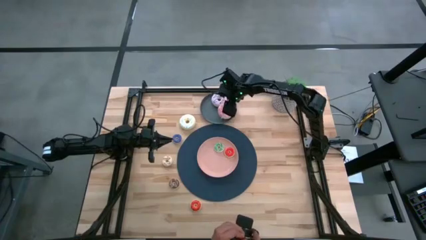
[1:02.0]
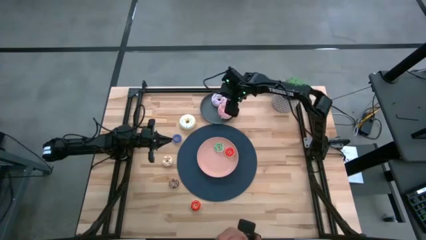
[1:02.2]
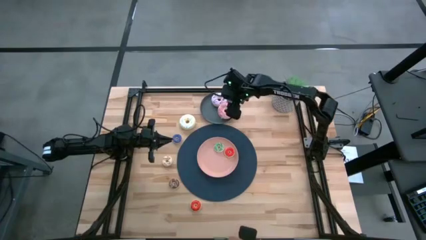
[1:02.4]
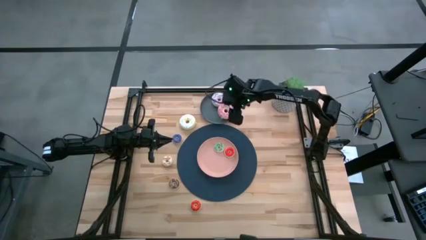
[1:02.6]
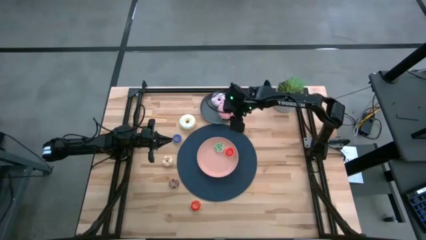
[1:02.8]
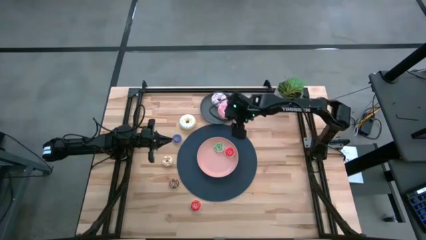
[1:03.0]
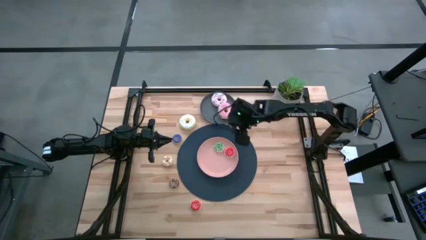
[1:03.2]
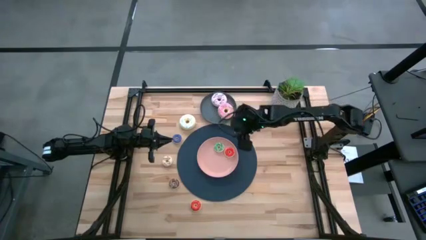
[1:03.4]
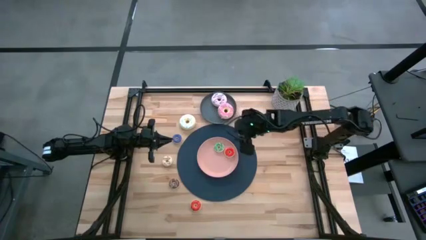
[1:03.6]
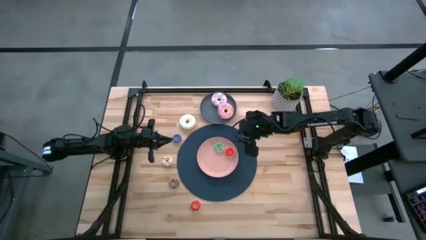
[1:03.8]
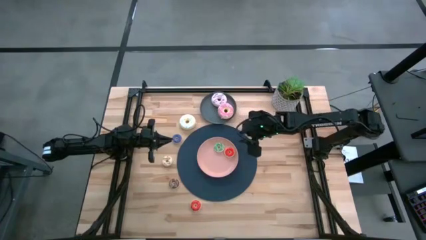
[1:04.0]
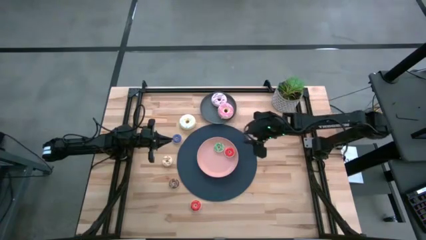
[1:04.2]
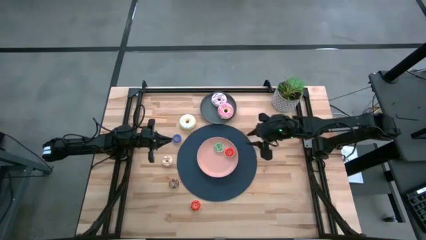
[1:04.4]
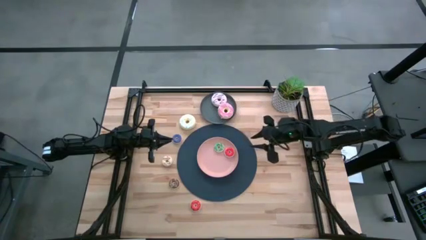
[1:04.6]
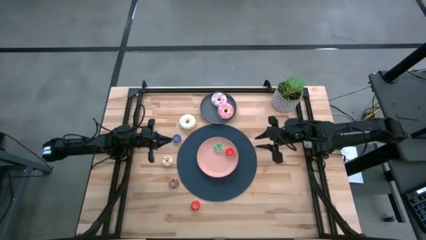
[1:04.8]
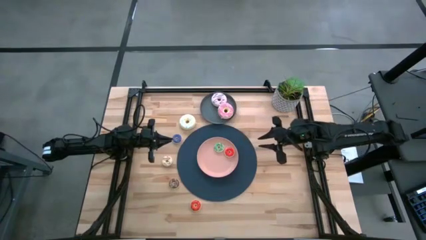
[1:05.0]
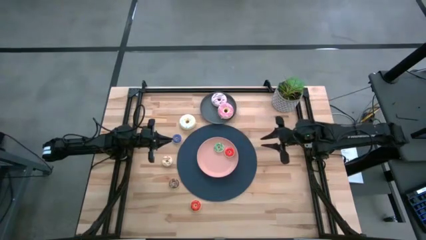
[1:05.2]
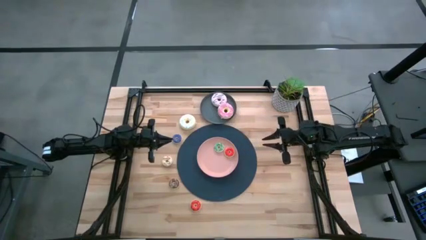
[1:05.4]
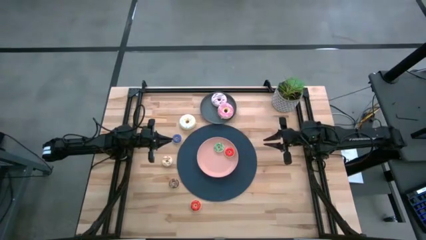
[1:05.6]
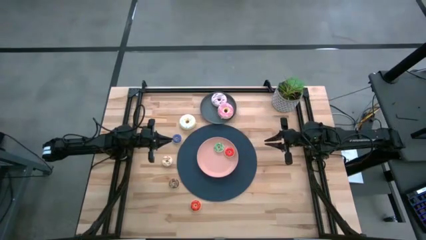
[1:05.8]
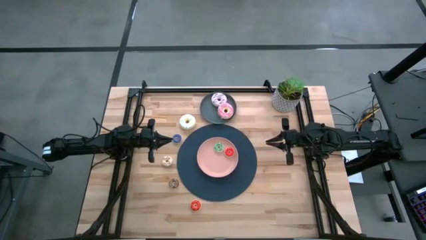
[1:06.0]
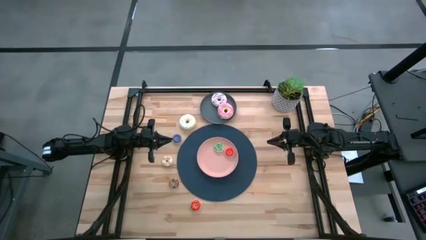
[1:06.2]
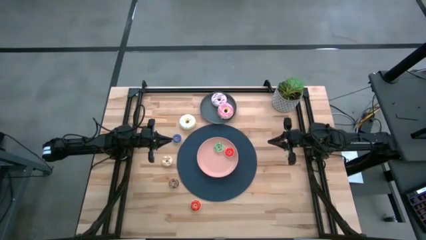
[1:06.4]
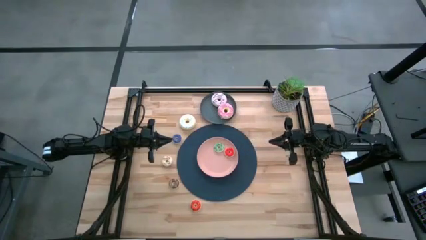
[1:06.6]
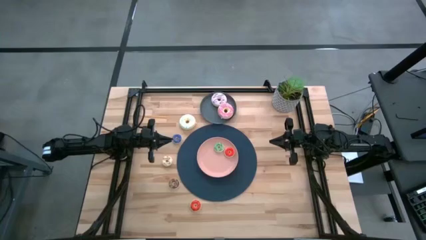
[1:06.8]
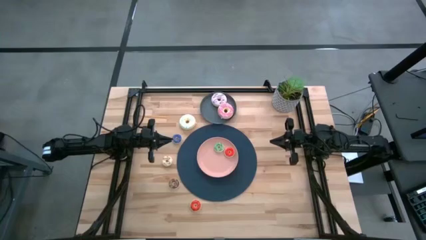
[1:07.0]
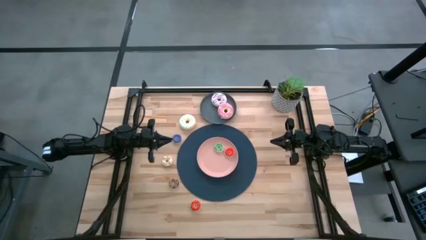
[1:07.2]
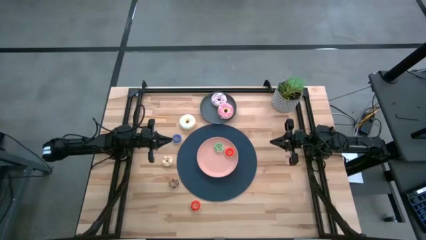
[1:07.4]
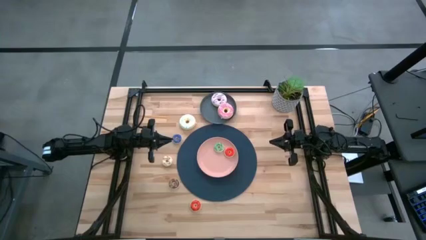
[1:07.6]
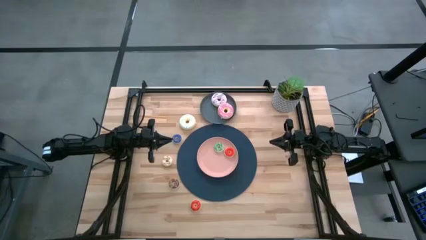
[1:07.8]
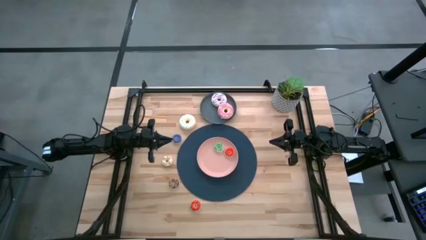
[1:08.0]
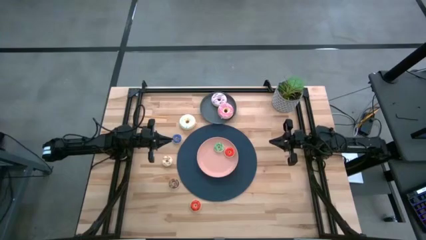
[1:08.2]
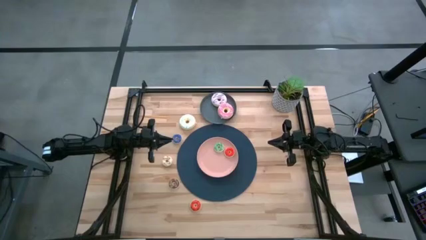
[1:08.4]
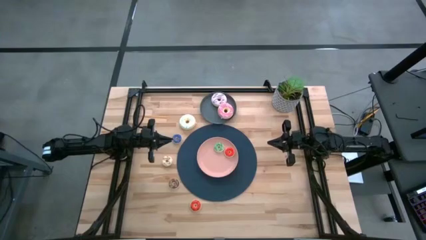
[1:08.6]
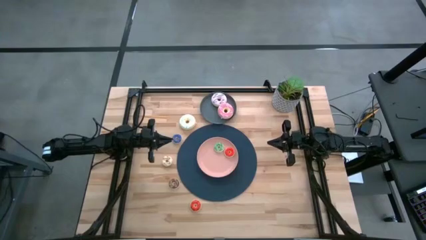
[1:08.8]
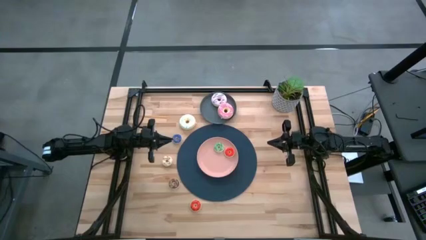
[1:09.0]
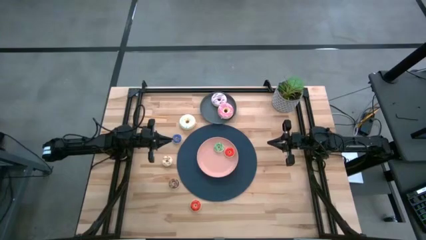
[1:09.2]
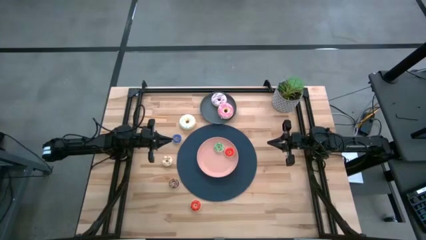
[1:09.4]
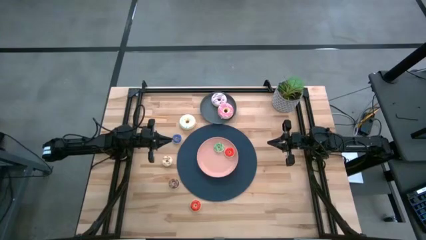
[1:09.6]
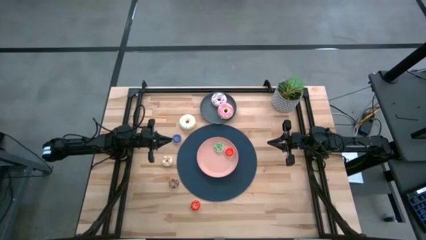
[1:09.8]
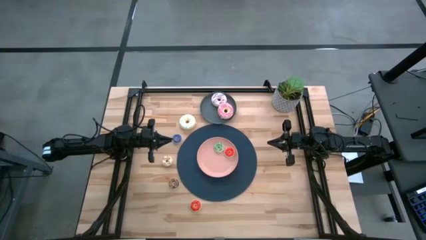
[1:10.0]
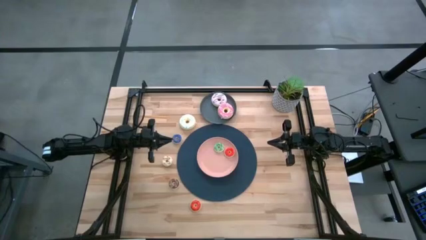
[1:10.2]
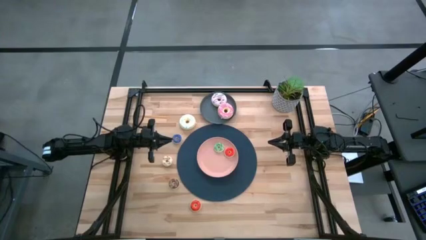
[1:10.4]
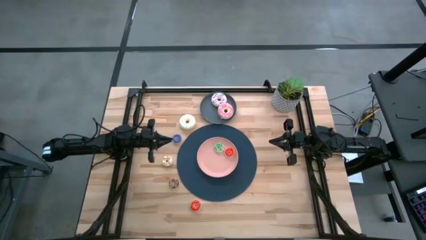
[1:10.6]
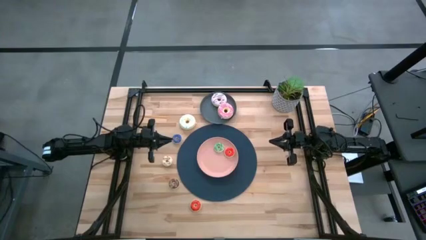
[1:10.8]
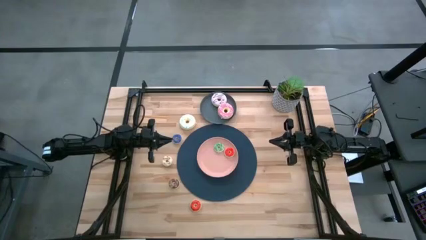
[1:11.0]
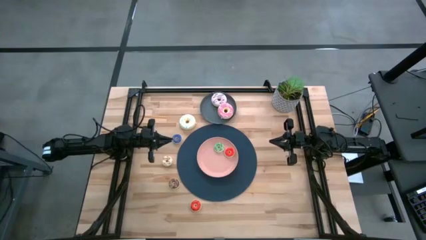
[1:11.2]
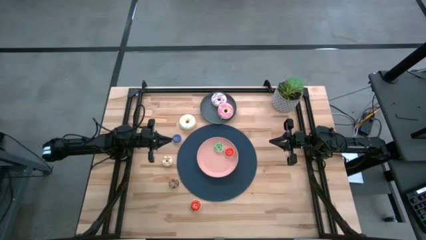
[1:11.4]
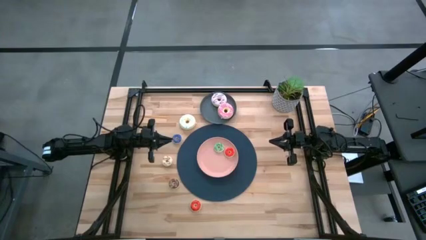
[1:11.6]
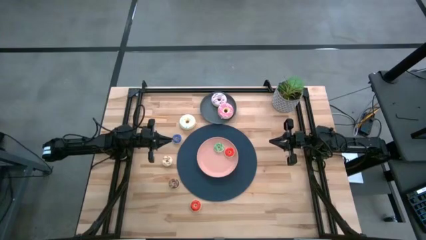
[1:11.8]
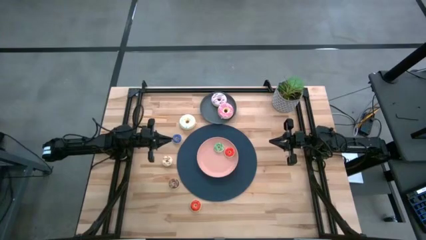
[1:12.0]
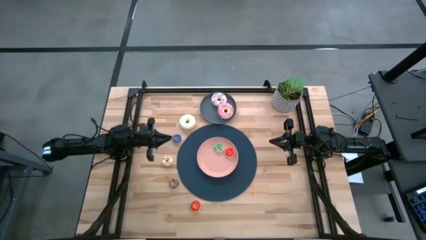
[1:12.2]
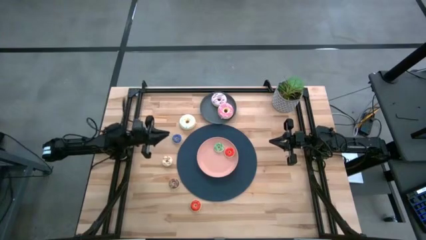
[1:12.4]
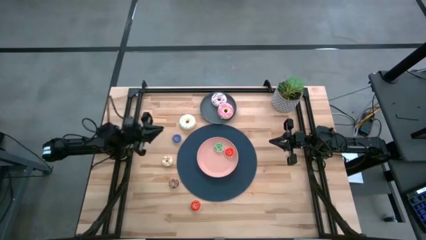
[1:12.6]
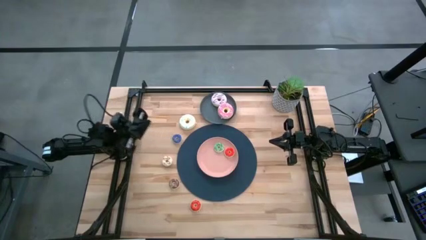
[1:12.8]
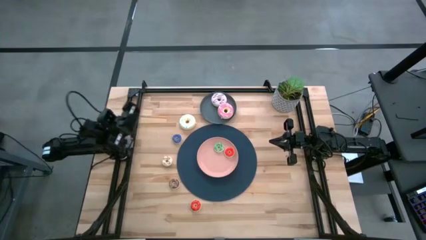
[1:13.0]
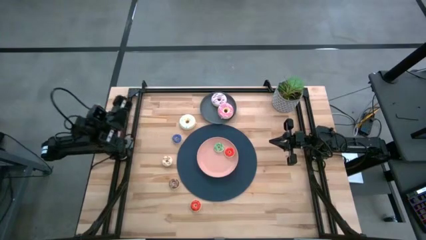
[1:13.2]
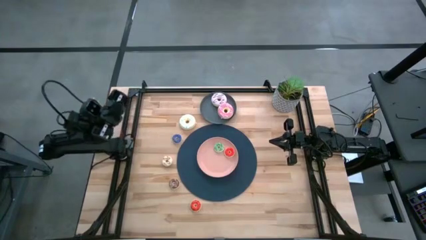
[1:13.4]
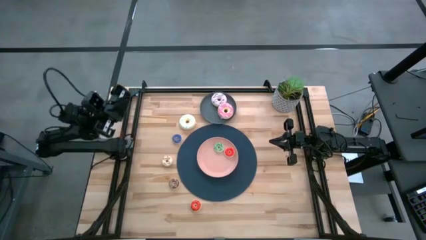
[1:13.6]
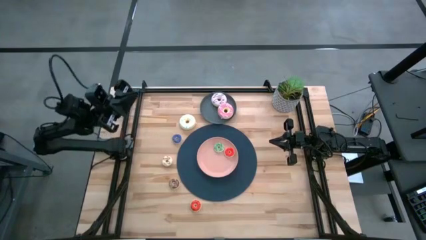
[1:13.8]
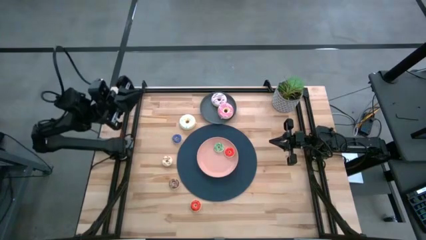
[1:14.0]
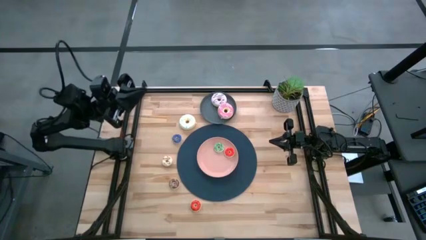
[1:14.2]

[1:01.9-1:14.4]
Task: Pick & Place donuts
Put the large white donut on the gray plate

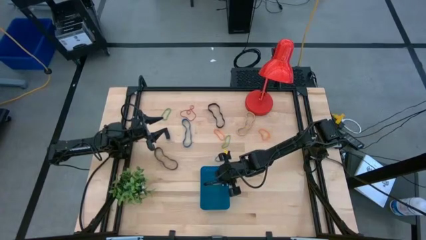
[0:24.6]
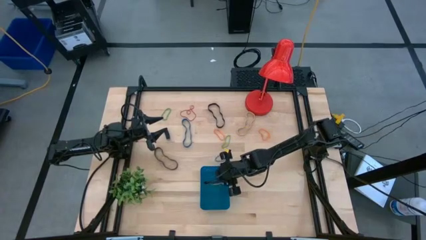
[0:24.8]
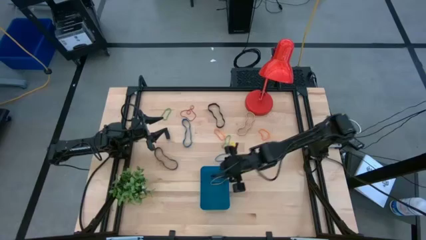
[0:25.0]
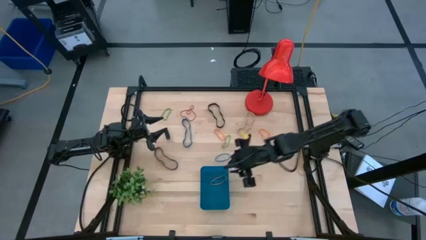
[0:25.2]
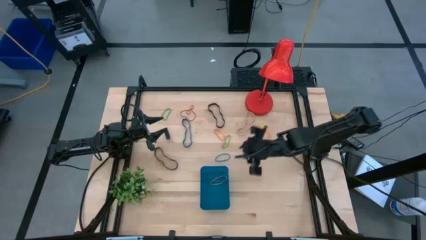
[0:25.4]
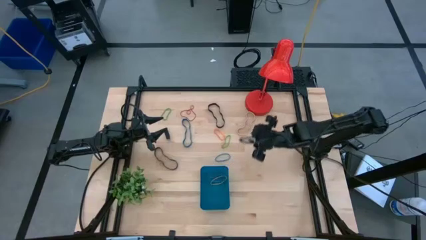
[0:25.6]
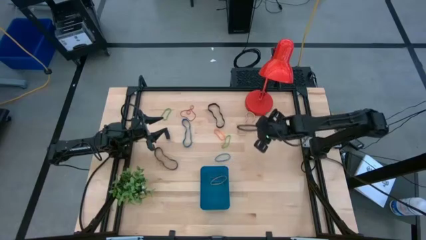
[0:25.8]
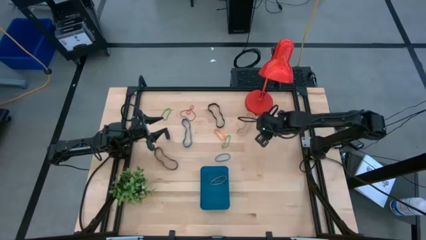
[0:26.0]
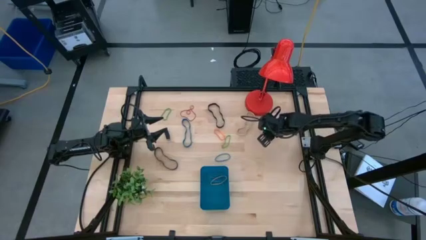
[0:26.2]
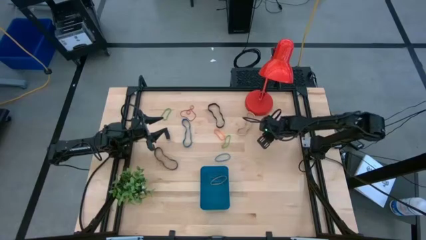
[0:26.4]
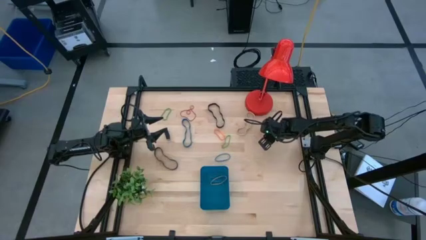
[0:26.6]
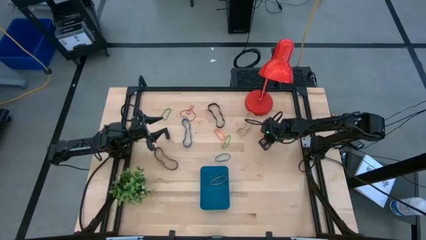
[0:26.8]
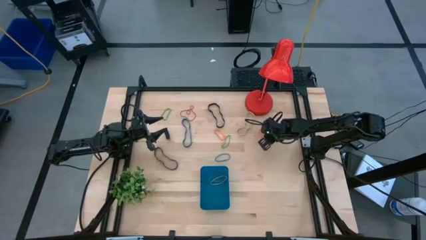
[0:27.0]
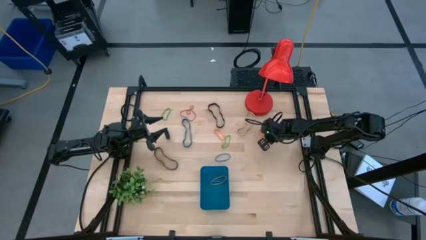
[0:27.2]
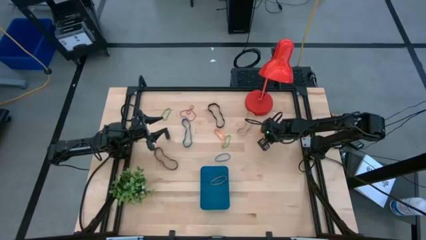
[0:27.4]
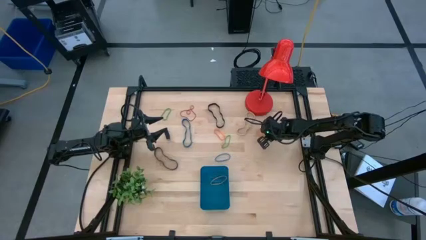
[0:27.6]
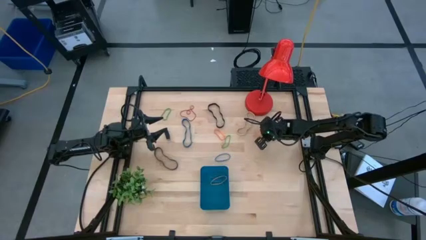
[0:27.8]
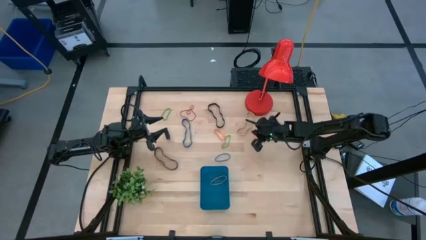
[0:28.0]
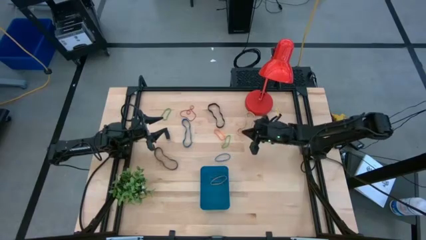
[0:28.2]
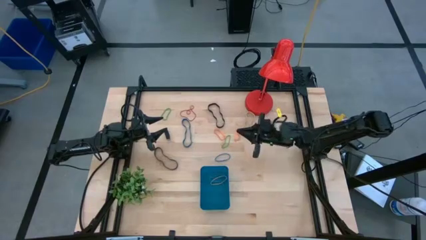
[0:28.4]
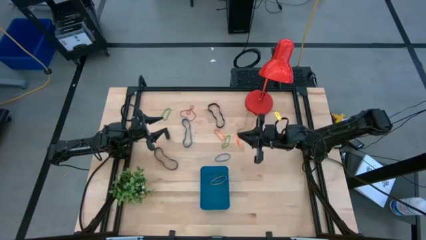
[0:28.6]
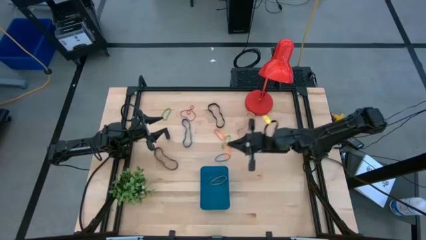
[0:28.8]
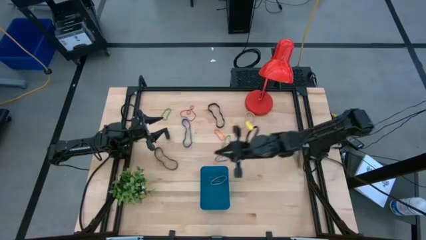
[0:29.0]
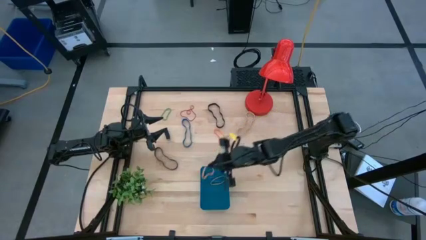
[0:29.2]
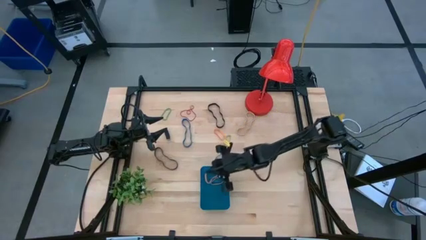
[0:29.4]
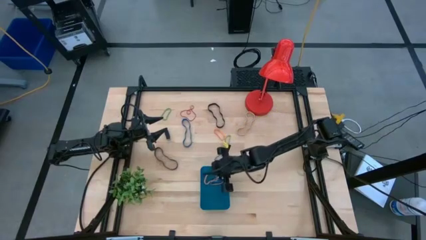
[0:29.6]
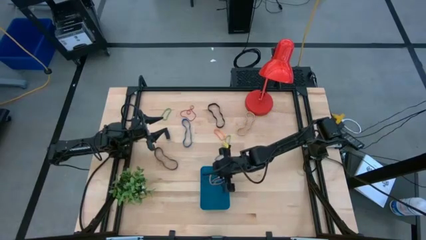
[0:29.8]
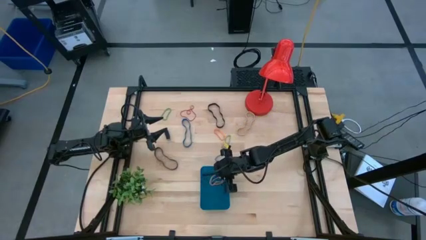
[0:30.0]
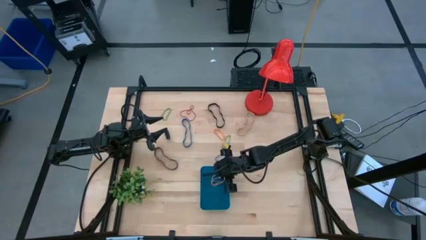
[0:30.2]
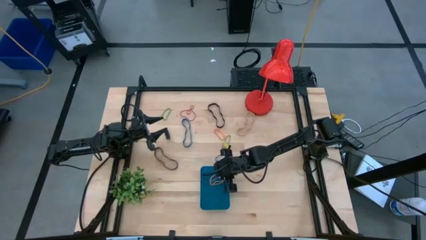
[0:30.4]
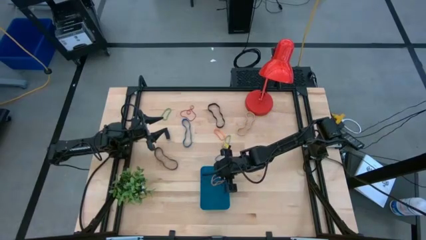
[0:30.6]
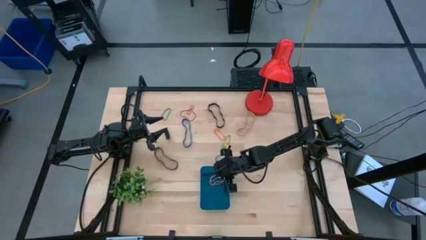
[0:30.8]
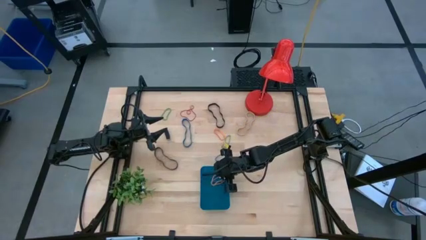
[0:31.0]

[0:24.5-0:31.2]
Task: Pick and place rubber bands into bin
Put the right orange rubber band into the blue bin
